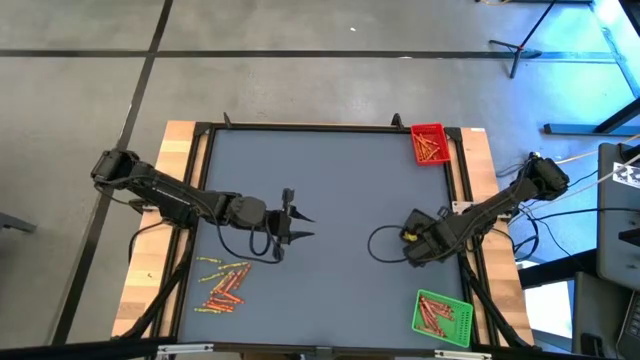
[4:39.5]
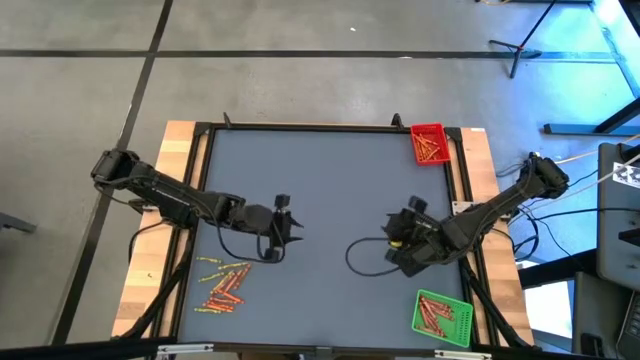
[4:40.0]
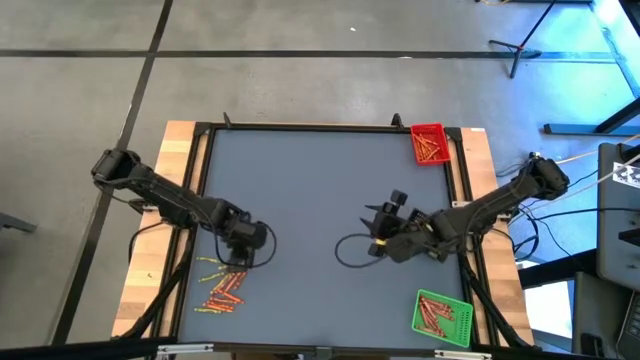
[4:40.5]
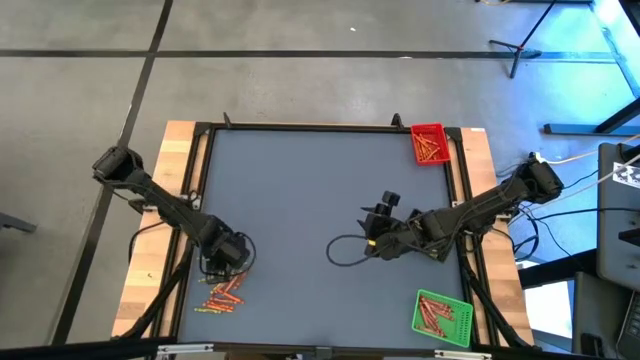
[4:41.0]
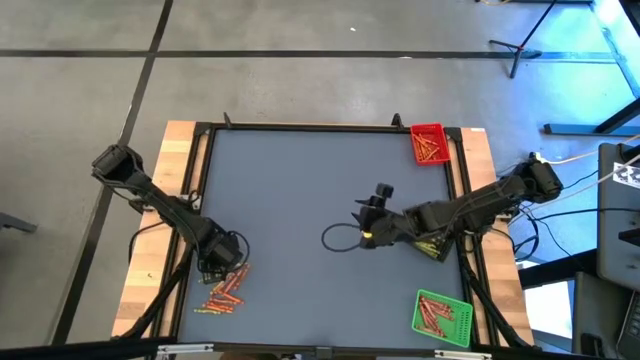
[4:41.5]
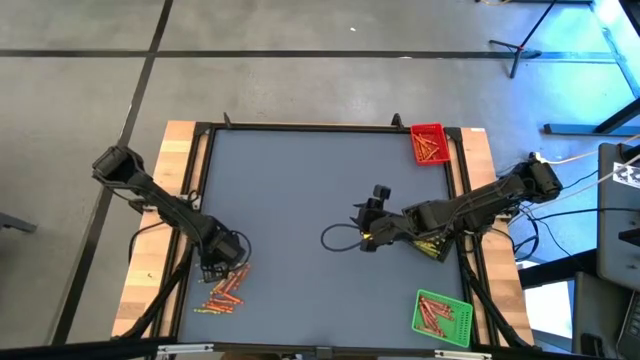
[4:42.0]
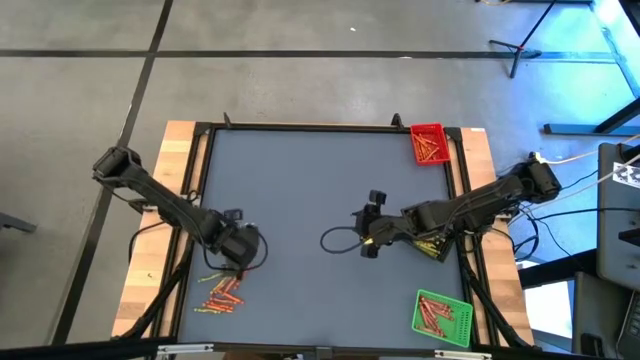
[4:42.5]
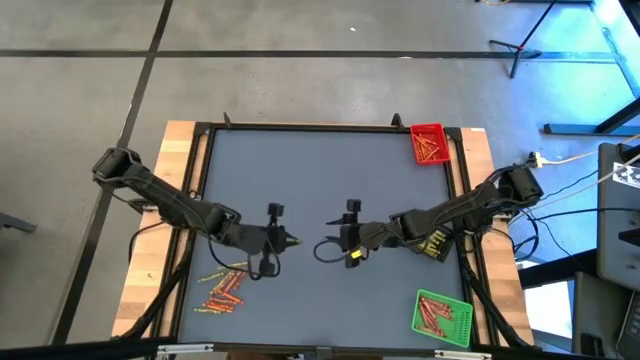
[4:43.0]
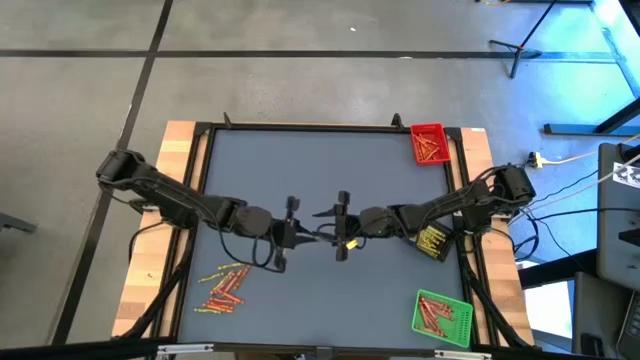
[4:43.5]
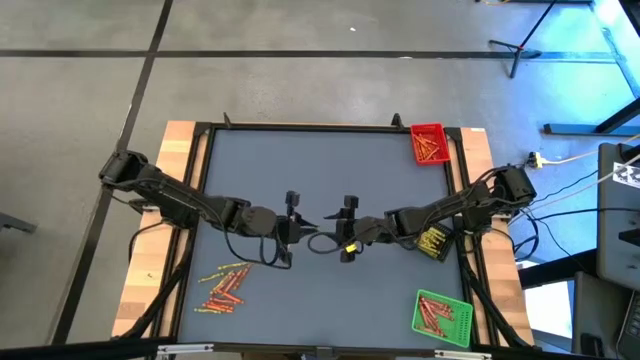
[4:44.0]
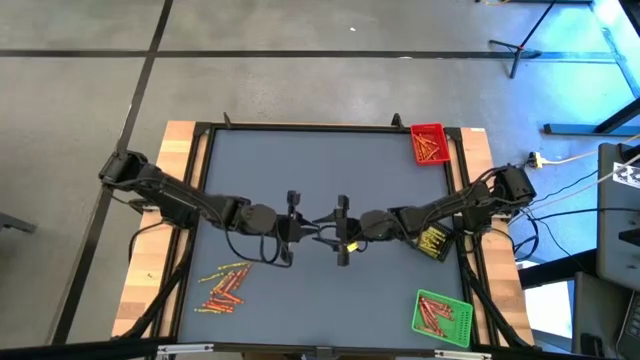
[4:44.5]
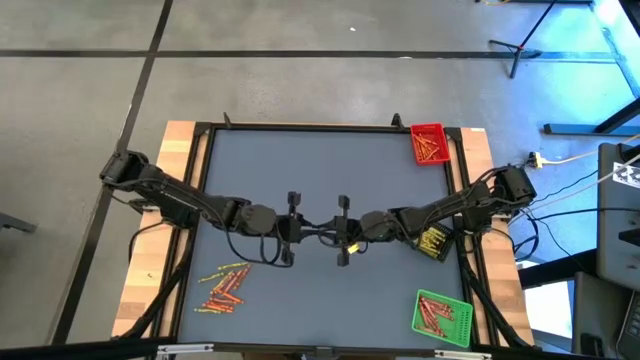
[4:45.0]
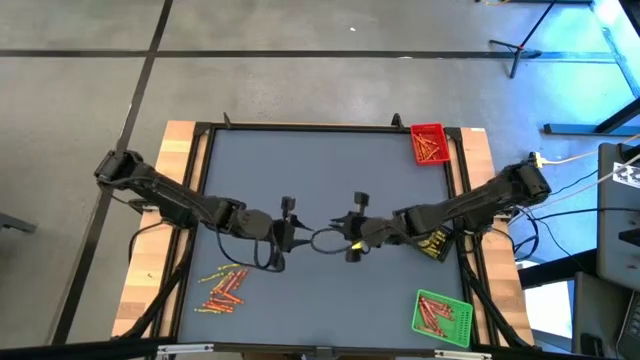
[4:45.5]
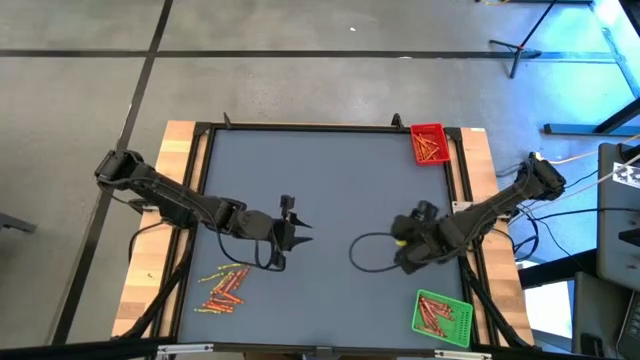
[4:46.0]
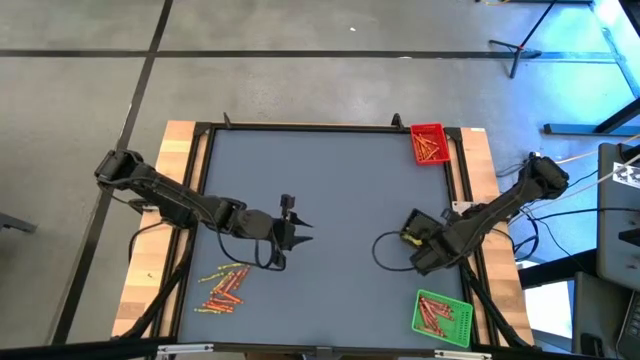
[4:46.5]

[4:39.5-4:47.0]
Task: Sort crayons
Put the green crayon into the black basket

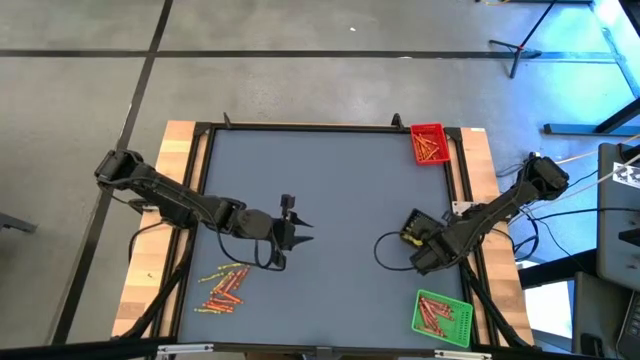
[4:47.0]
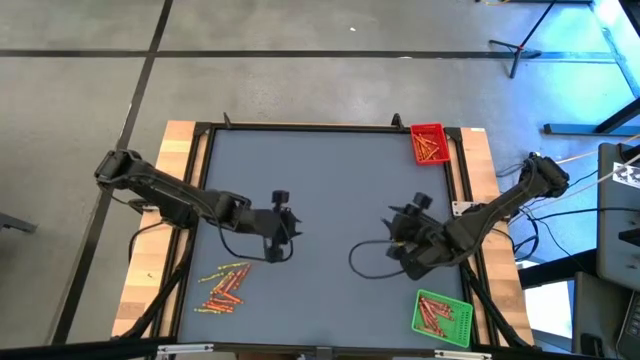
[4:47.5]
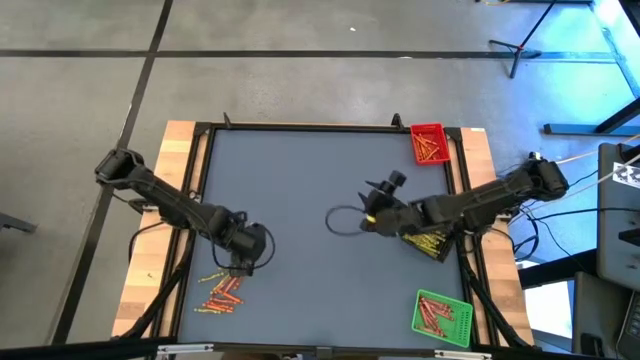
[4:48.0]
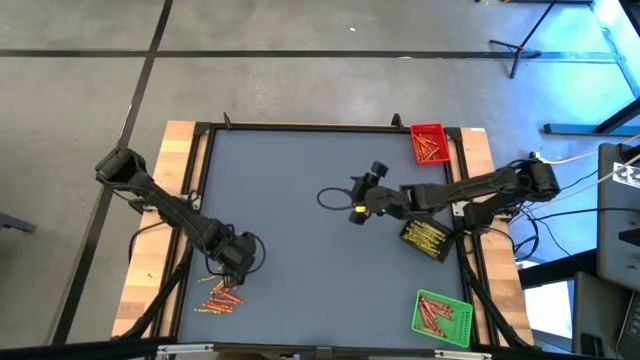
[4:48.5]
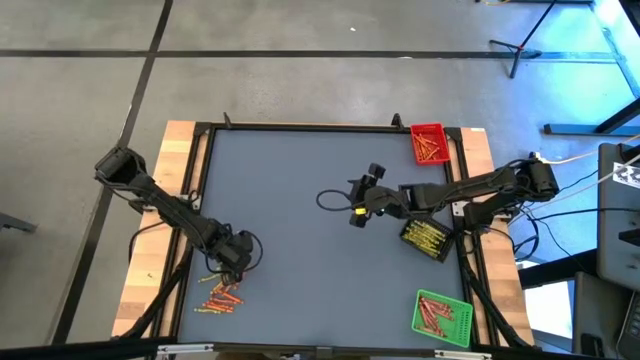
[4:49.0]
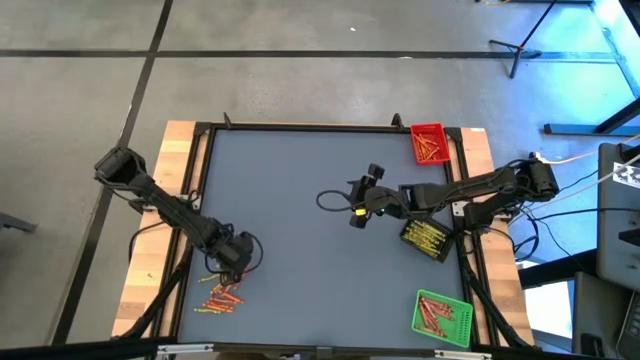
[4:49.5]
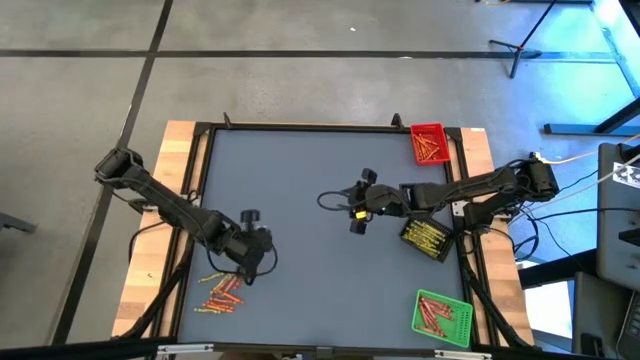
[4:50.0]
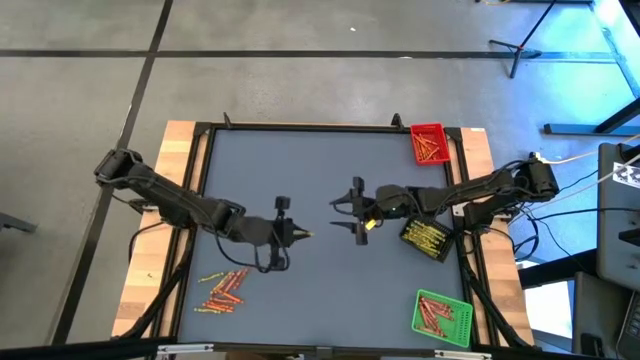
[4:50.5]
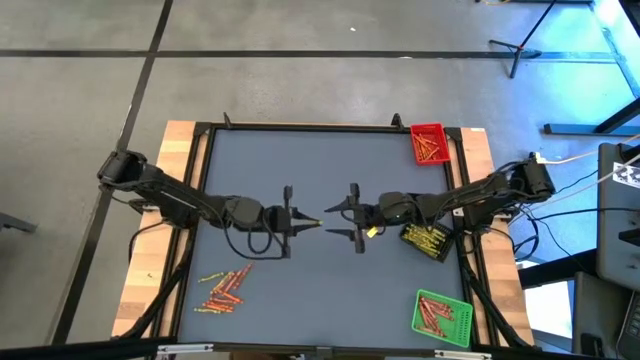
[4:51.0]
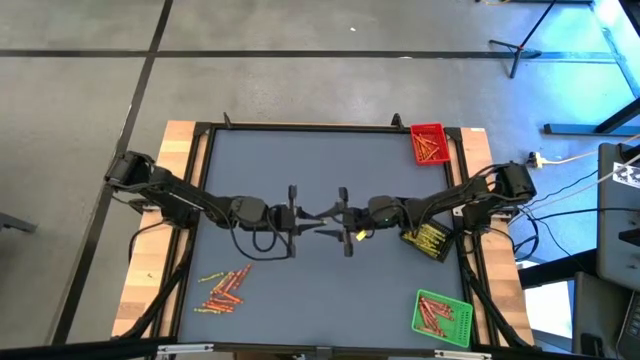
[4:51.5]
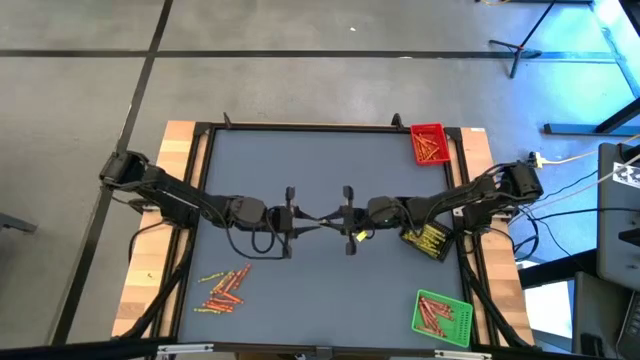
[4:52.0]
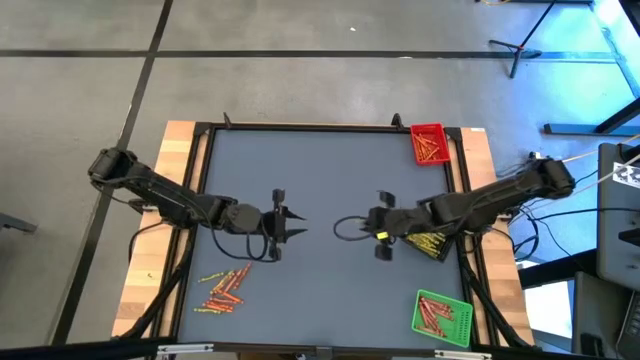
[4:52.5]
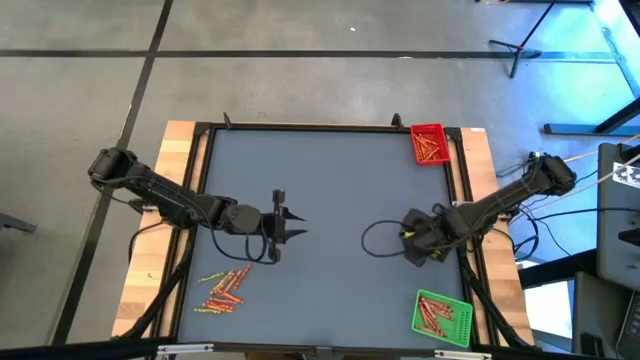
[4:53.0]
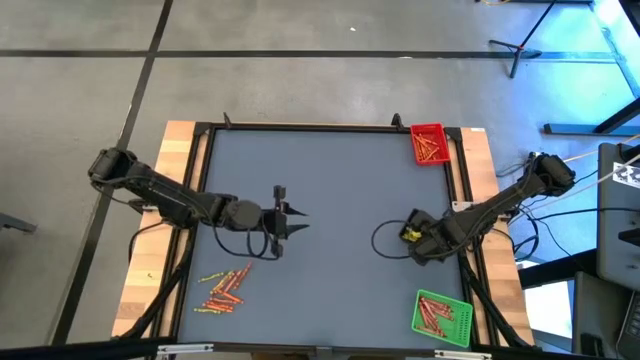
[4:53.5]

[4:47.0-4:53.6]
Put the yellow green crayon into the black basket

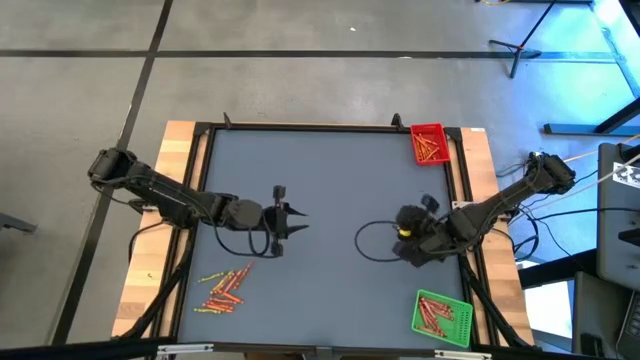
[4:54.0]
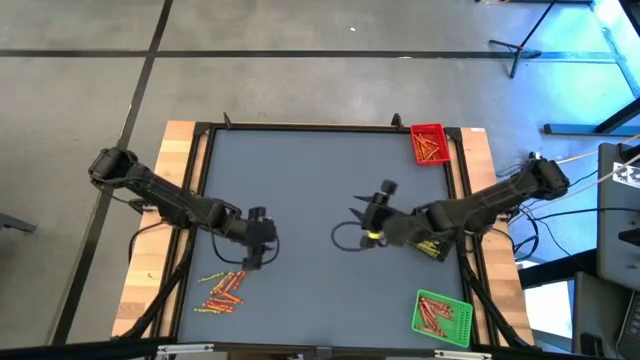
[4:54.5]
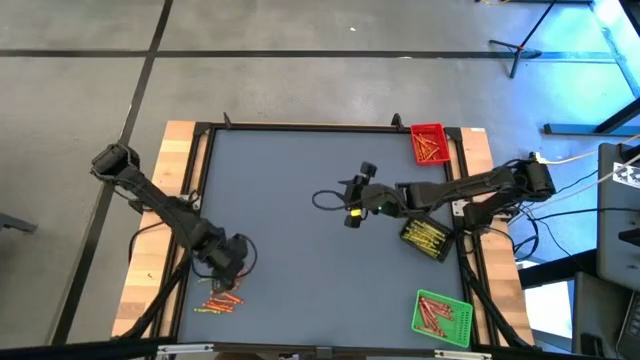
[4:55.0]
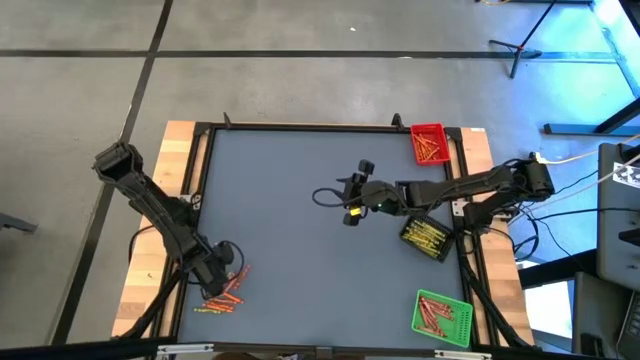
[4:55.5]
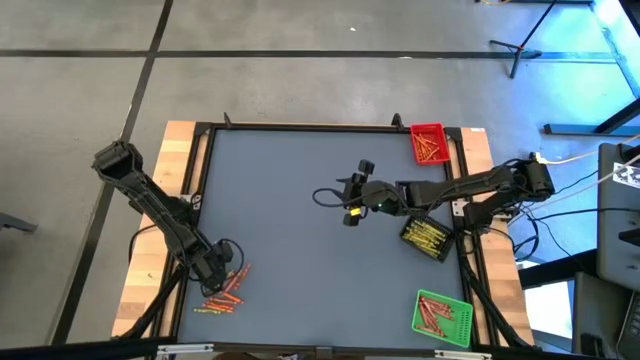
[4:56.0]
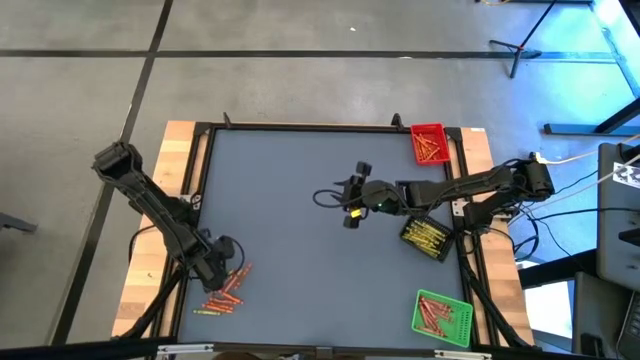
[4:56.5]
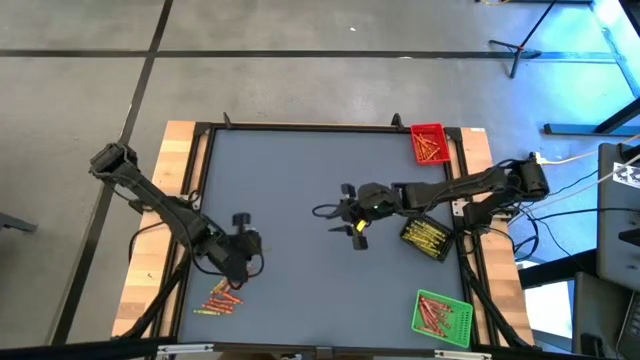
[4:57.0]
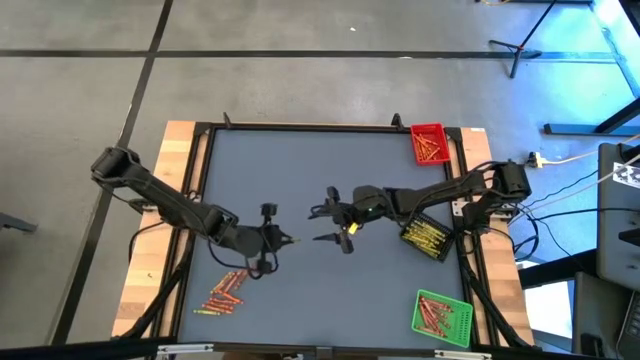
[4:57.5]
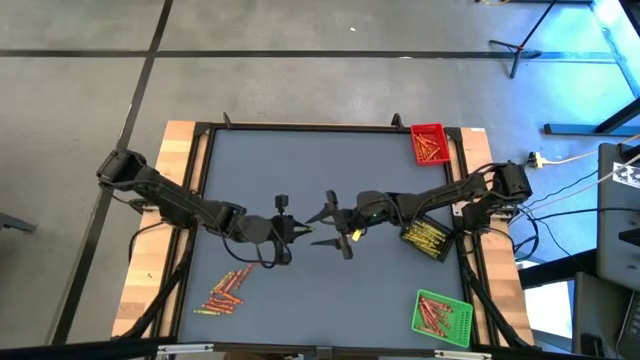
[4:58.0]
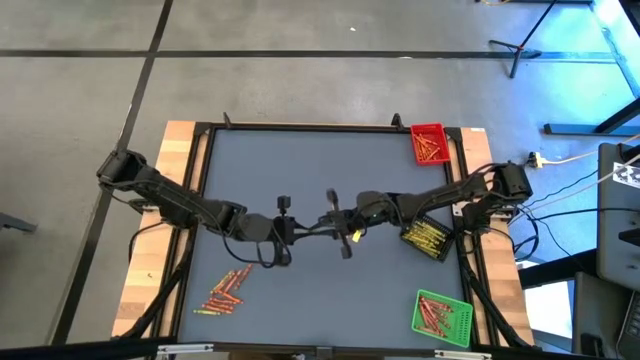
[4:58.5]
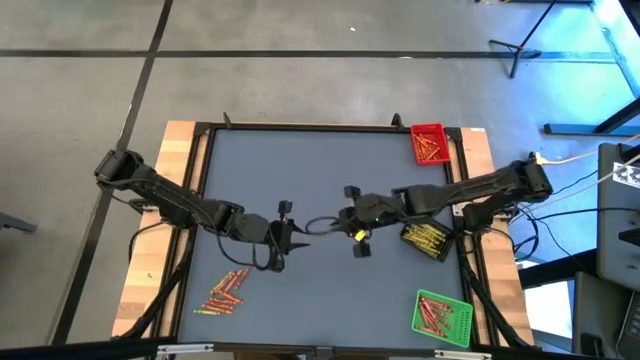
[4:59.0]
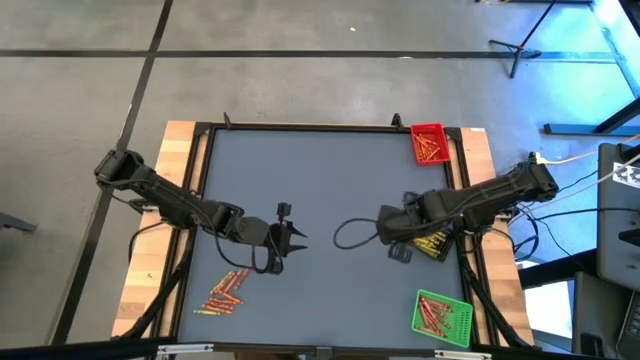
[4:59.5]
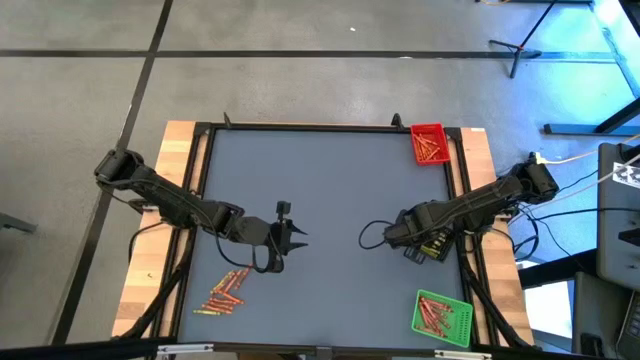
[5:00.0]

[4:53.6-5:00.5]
Put the green crayon into the black basket
